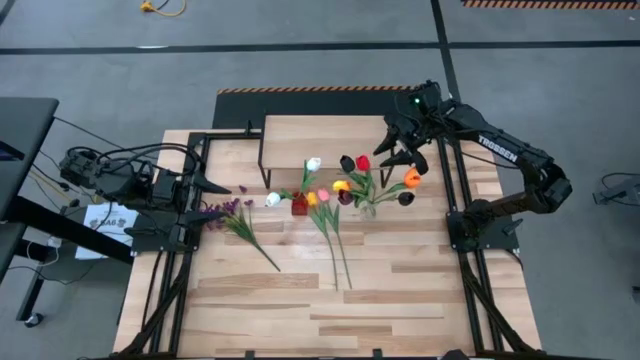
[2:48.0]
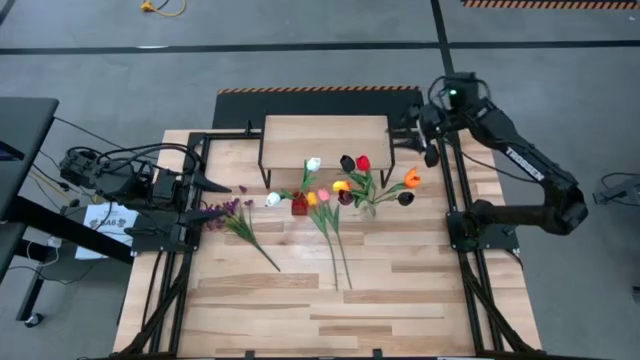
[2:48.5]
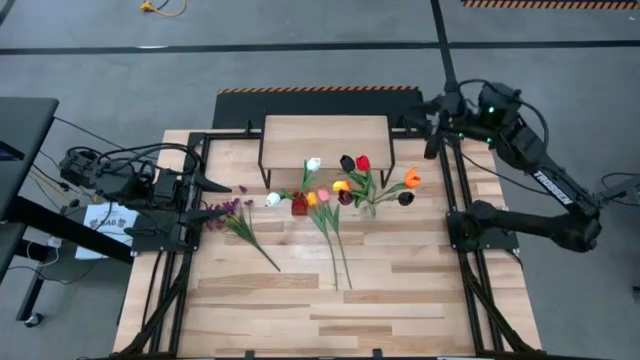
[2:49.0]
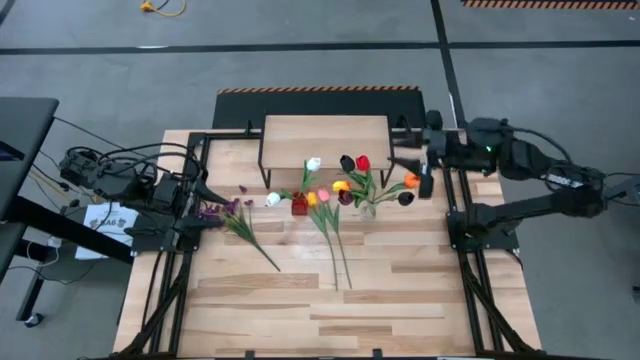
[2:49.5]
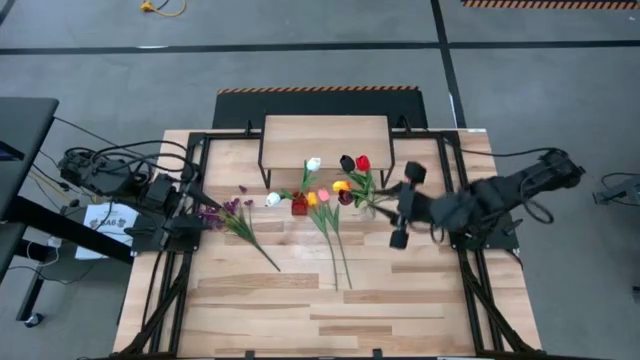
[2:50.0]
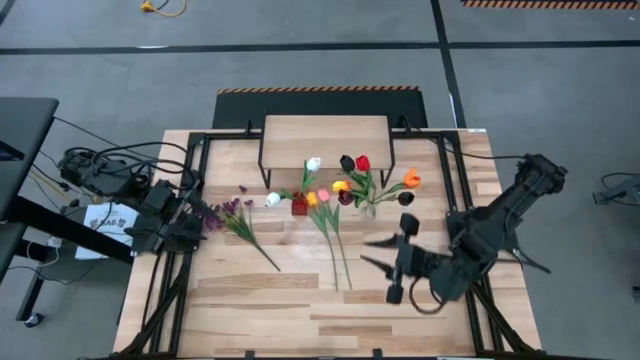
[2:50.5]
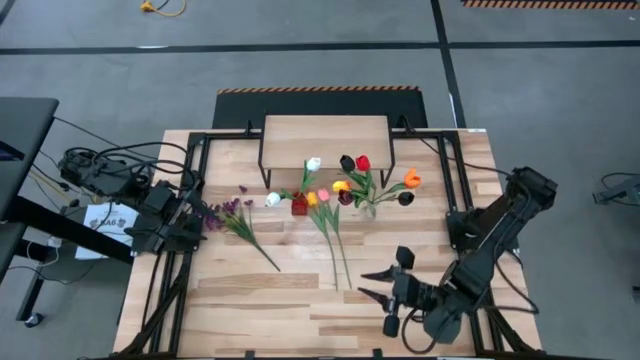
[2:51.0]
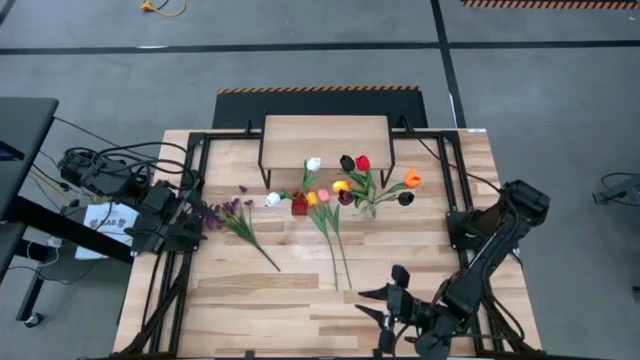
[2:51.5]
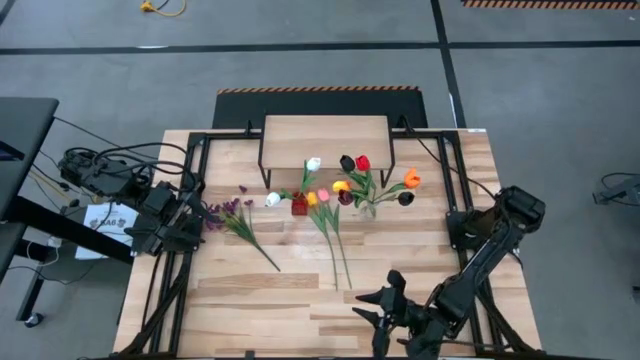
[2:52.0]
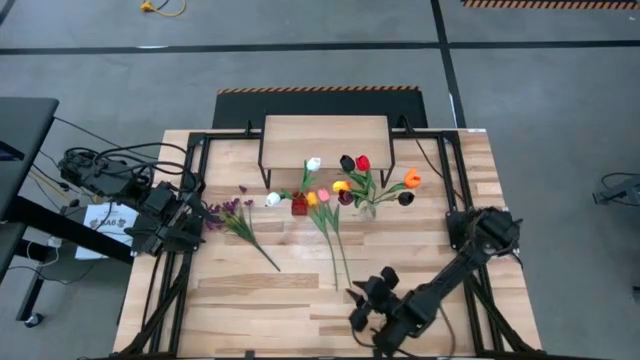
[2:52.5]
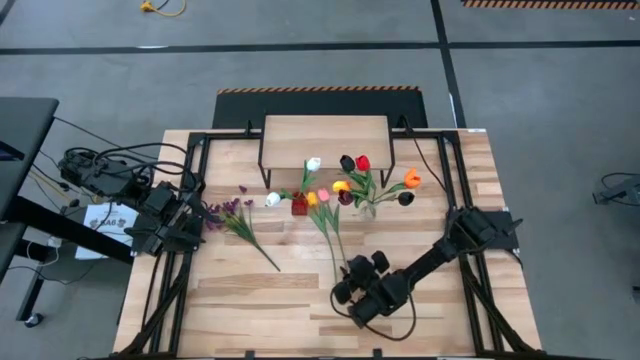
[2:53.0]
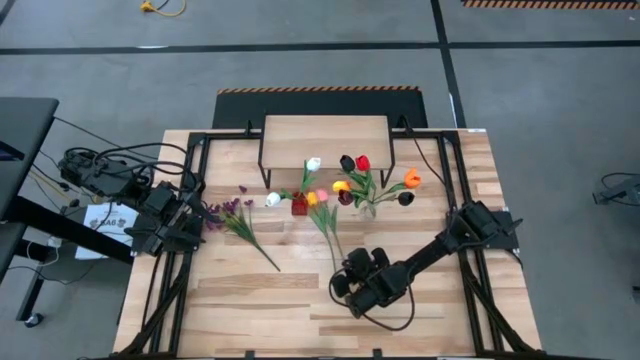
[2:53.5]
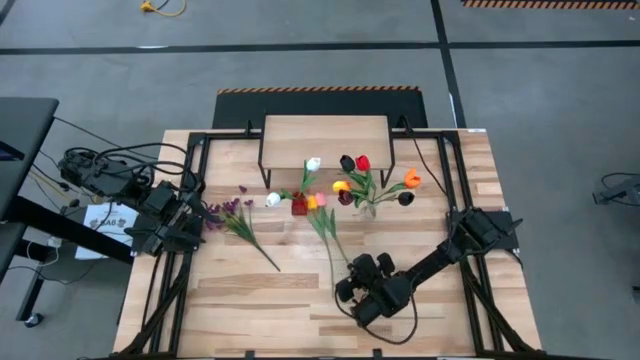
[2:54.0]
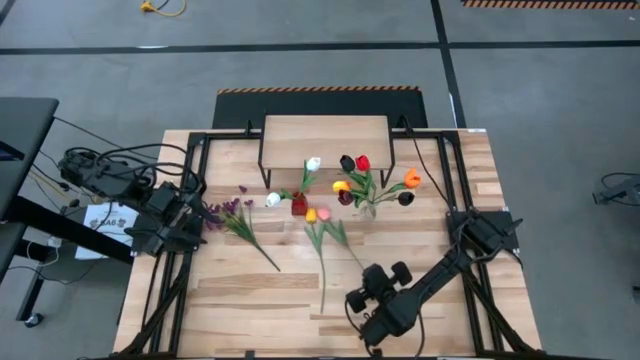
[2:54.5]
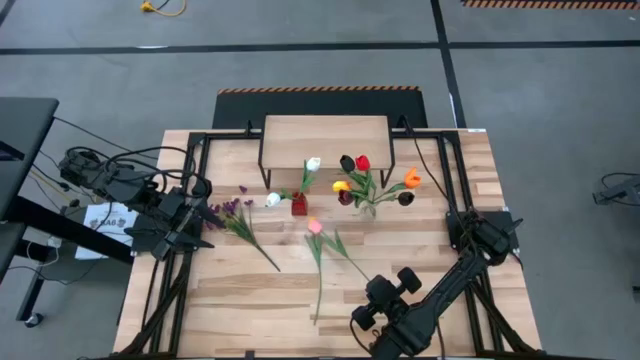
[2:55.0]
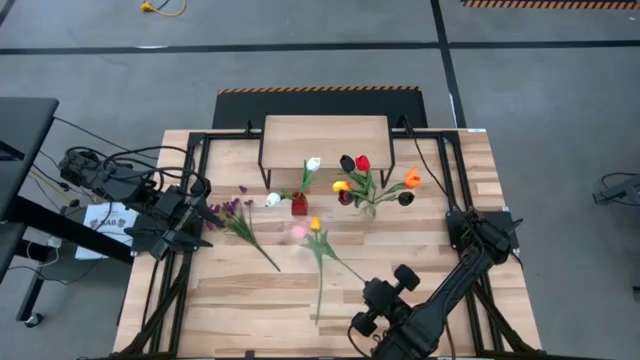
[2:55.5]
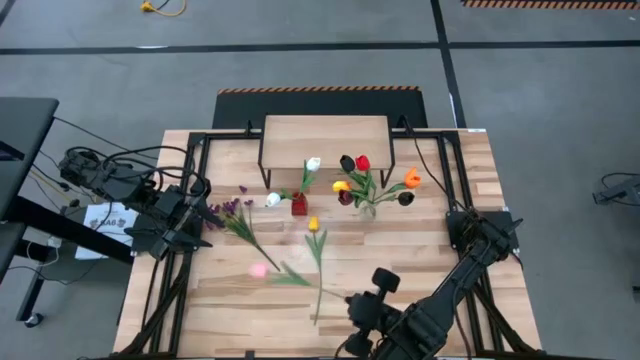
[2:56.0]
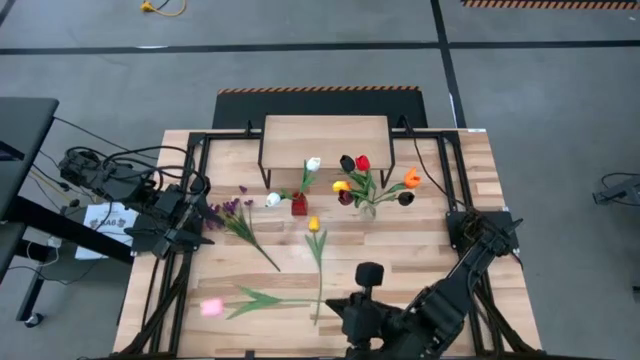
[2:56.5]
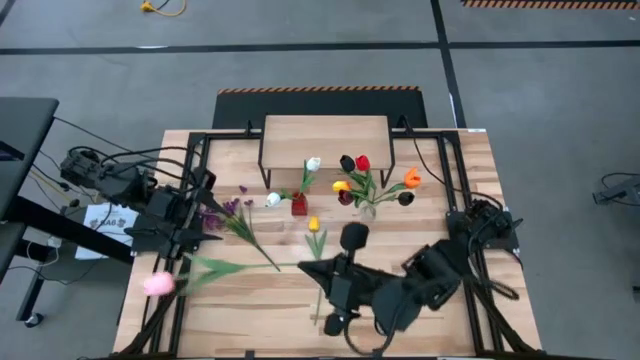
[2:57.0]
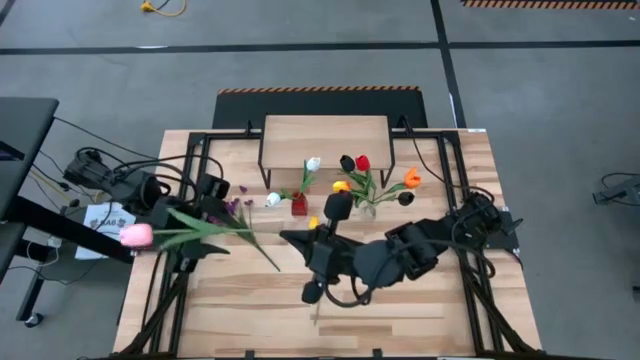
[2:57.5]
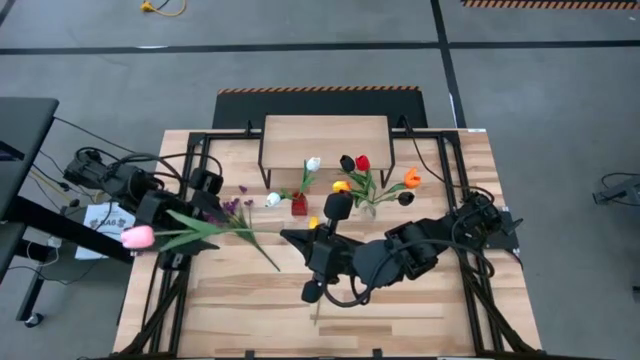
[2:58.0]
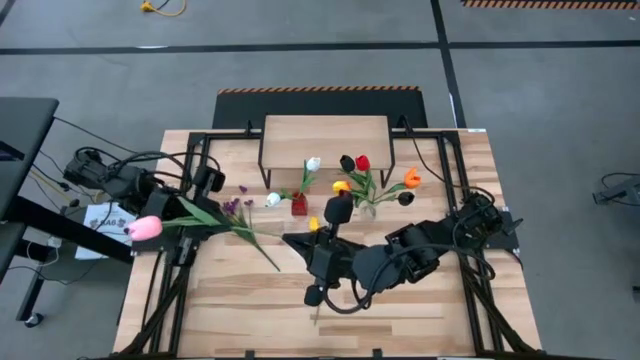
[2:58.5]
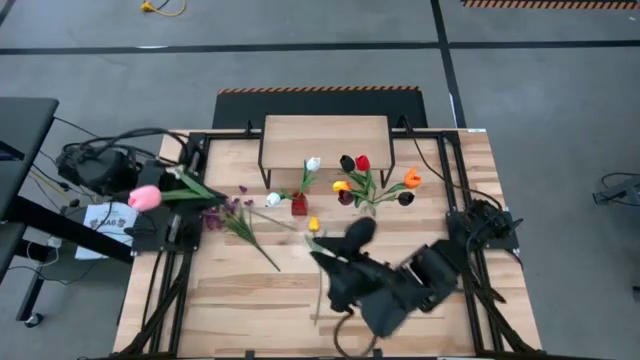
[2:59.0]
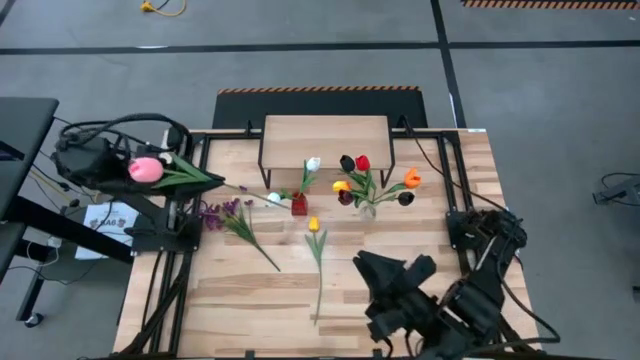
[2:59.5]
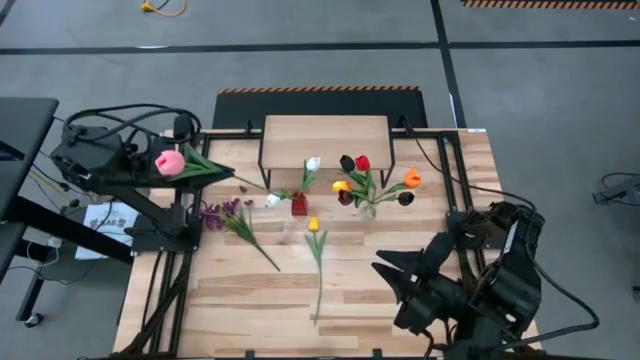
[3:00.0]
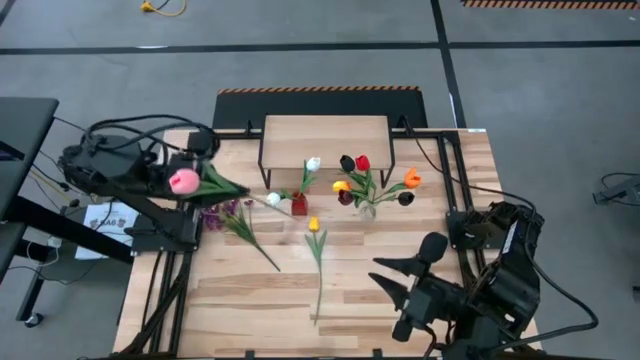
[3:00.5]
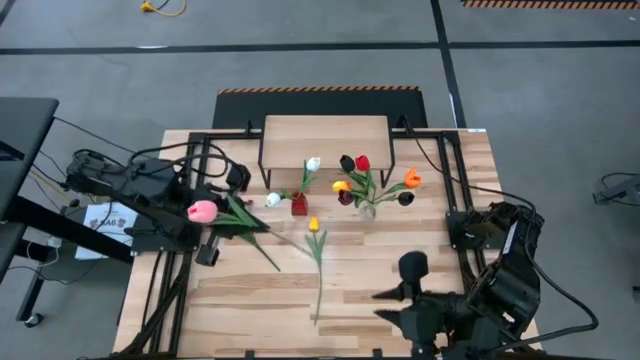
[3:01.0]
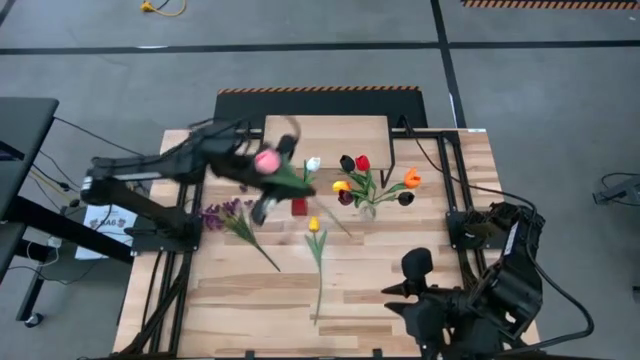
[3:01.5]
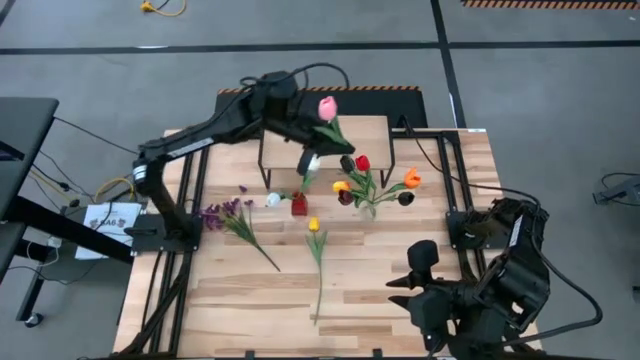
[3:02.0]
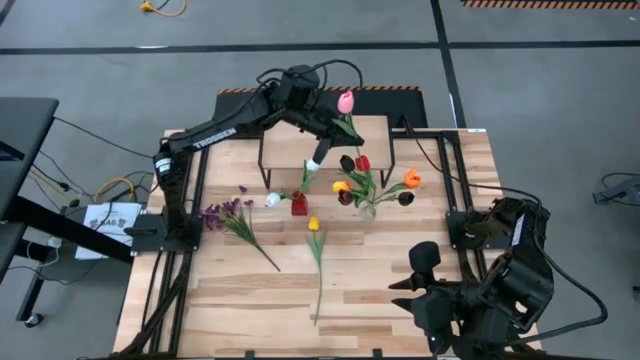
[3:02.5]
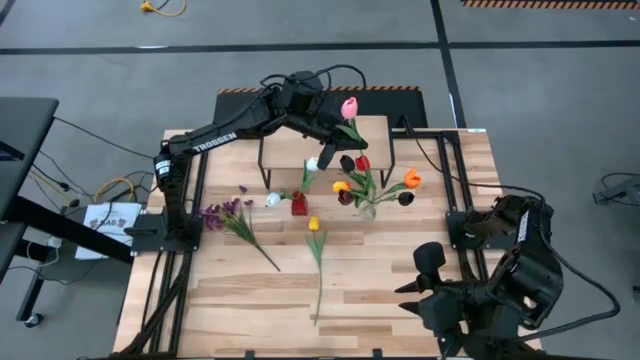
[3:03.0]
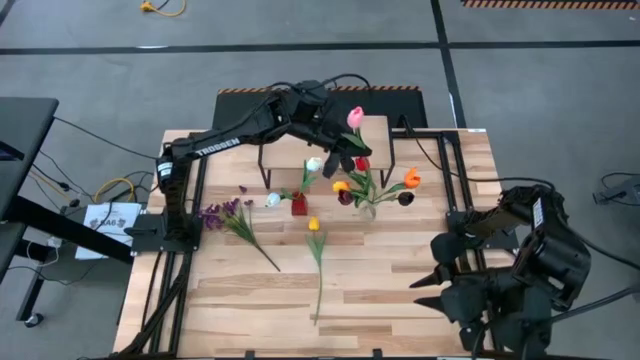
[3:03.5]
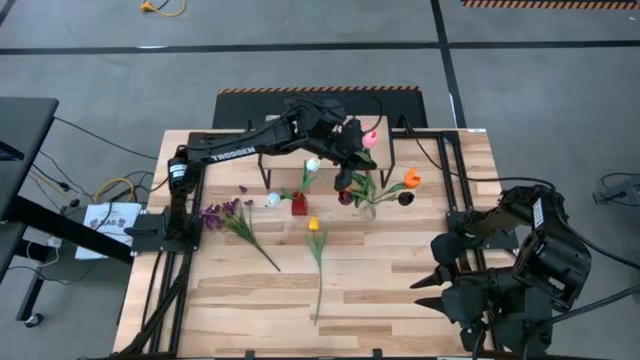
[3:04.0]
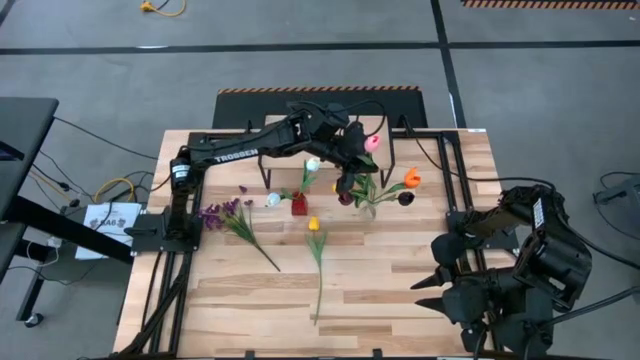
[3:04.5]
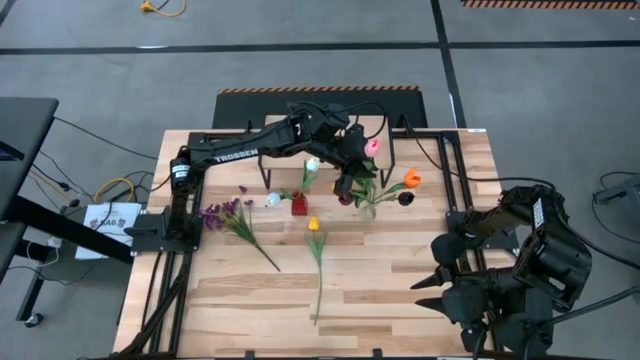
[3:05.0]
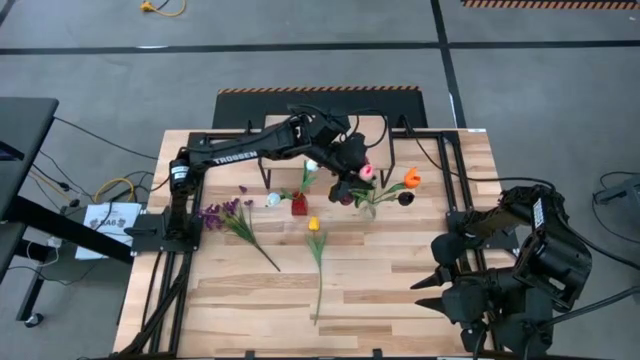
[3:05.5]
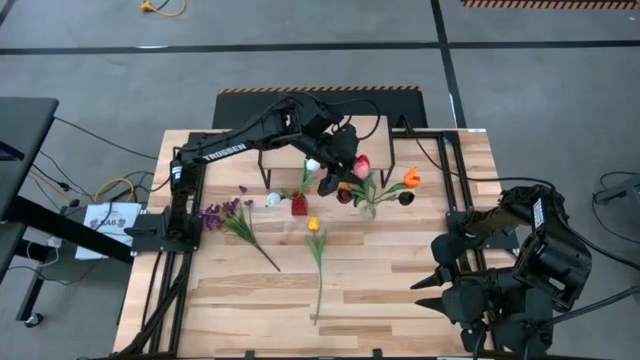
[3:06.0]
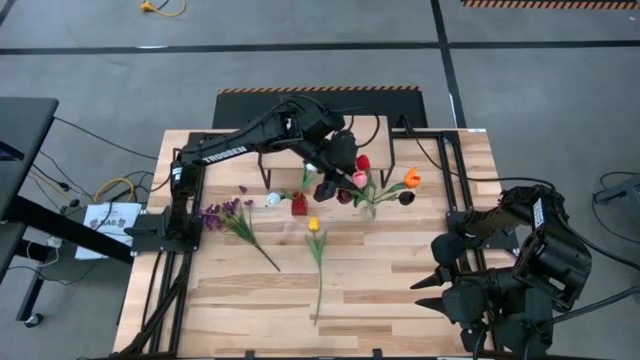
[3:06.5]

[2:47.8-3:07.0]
Task: Pick and place flowers into a vace then onto a shelf
Put the pink flower into the transparent vase
